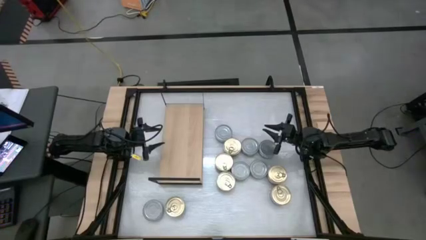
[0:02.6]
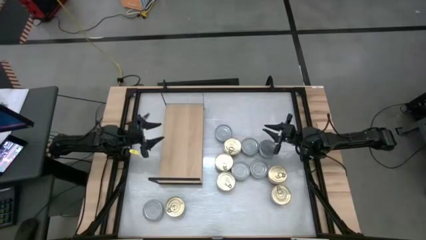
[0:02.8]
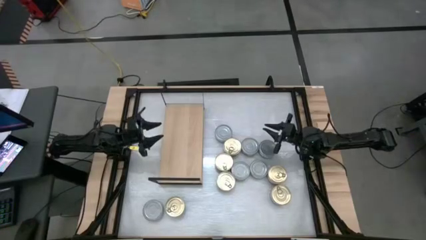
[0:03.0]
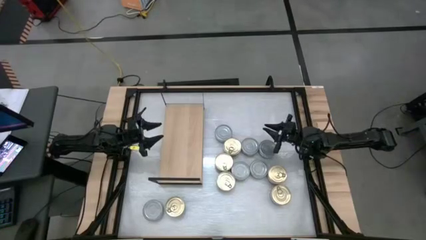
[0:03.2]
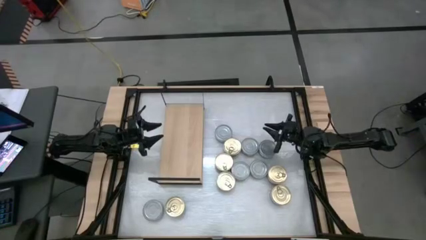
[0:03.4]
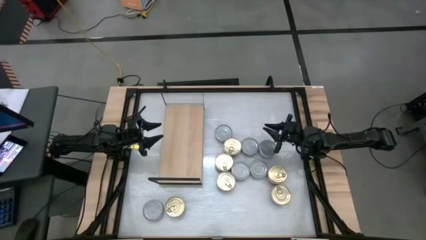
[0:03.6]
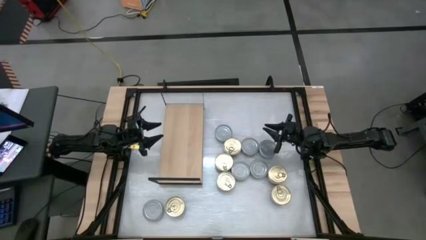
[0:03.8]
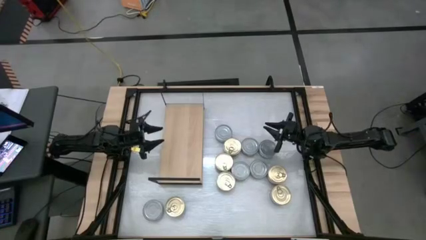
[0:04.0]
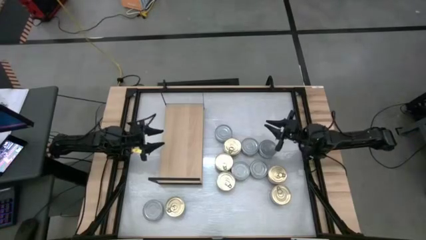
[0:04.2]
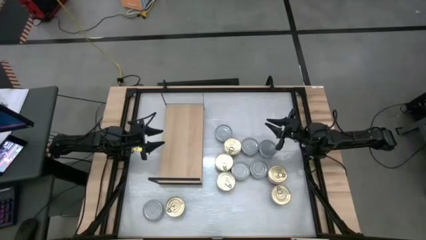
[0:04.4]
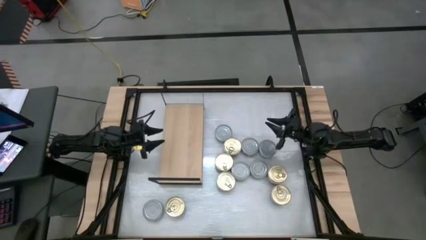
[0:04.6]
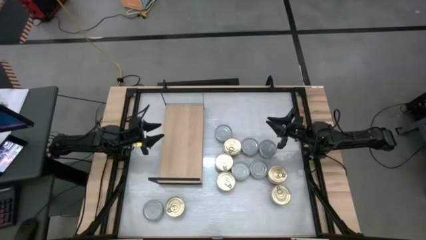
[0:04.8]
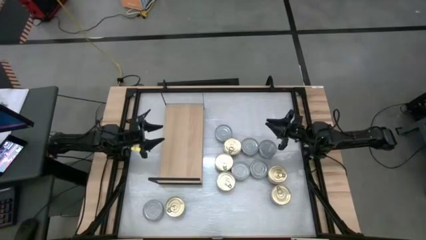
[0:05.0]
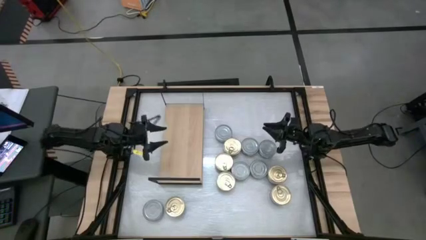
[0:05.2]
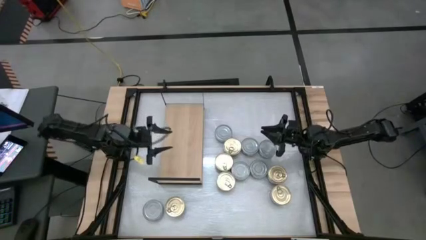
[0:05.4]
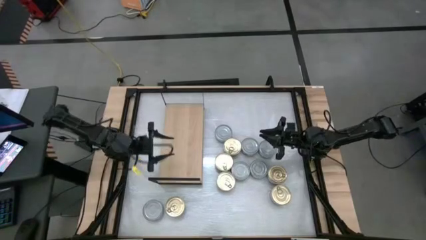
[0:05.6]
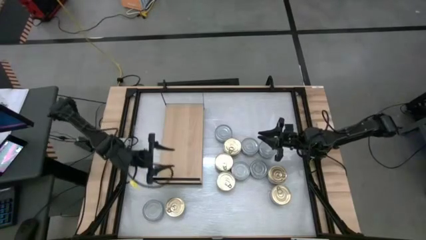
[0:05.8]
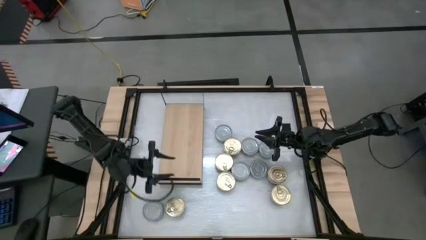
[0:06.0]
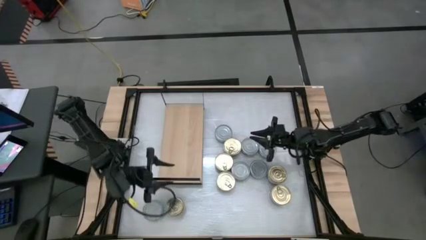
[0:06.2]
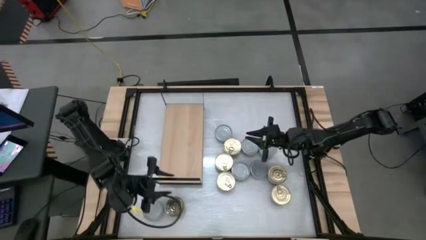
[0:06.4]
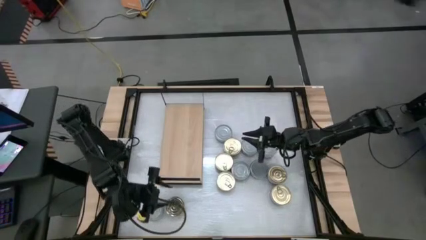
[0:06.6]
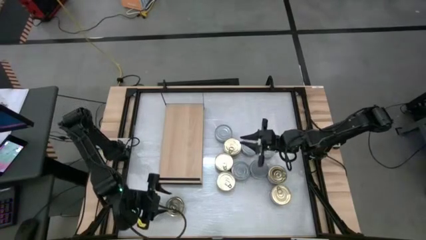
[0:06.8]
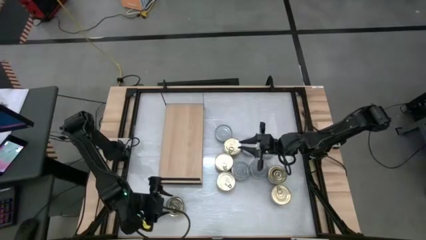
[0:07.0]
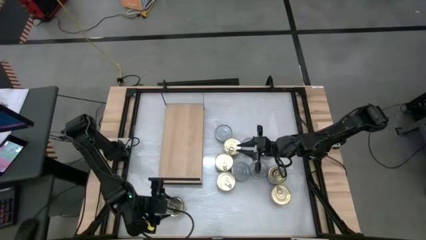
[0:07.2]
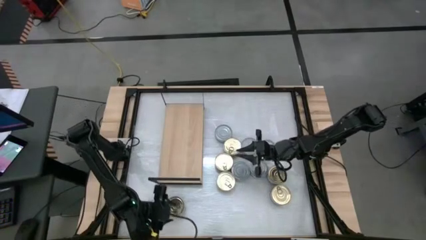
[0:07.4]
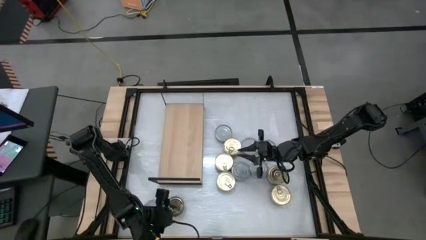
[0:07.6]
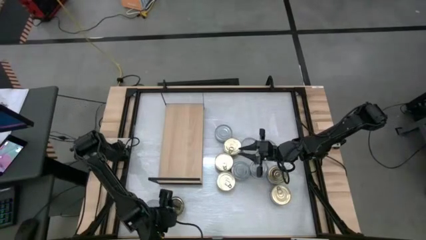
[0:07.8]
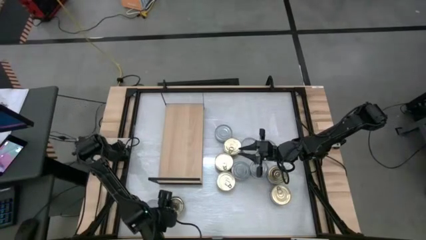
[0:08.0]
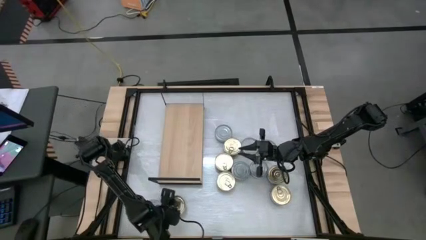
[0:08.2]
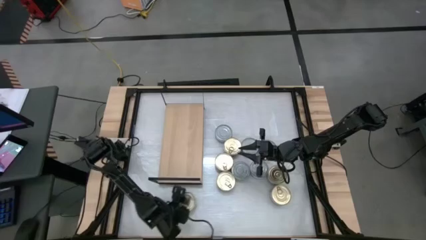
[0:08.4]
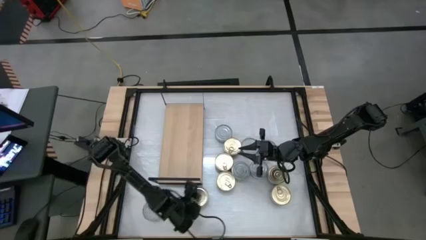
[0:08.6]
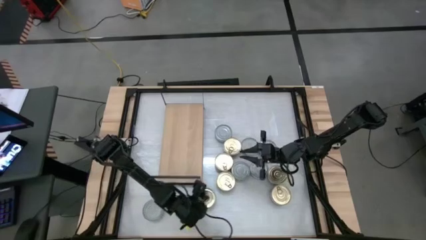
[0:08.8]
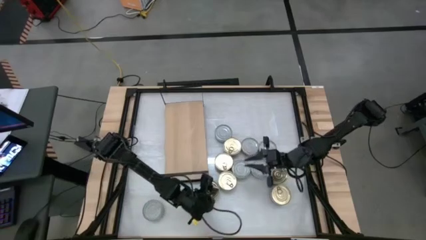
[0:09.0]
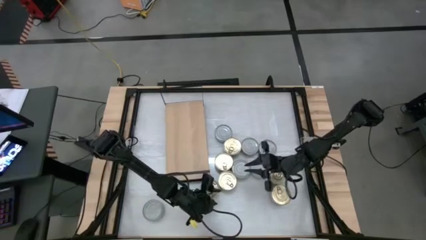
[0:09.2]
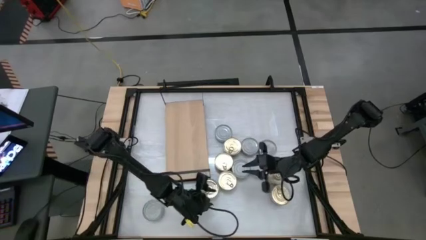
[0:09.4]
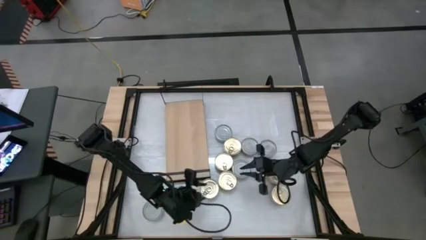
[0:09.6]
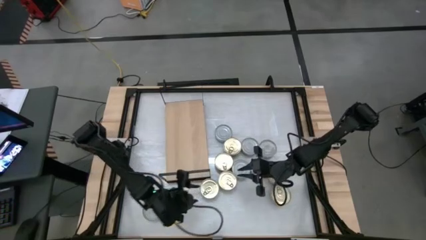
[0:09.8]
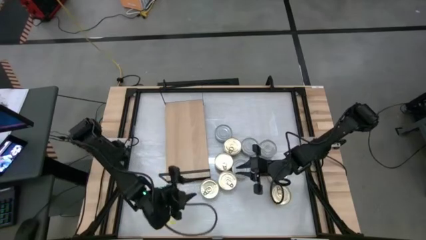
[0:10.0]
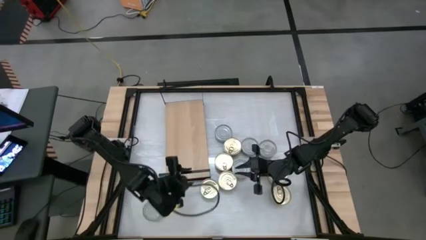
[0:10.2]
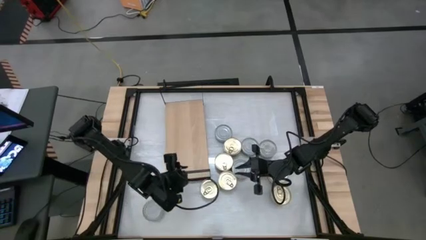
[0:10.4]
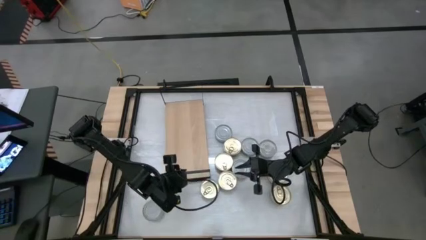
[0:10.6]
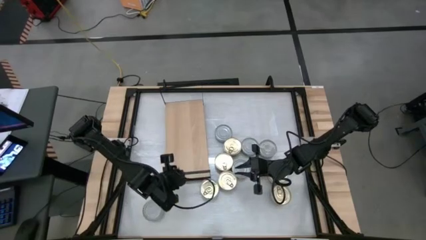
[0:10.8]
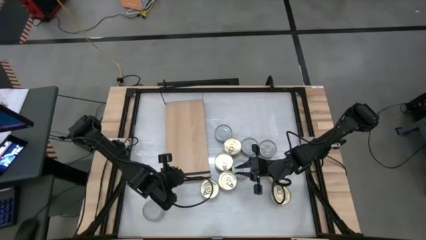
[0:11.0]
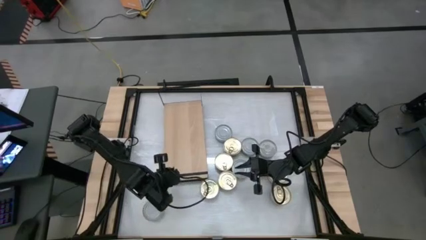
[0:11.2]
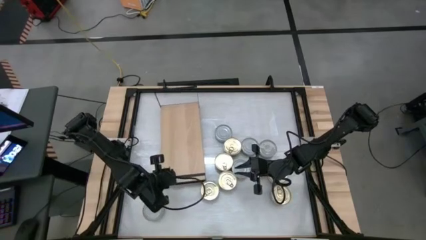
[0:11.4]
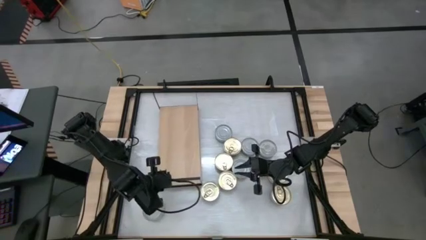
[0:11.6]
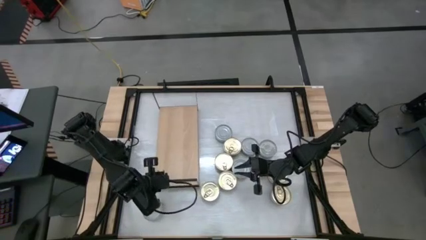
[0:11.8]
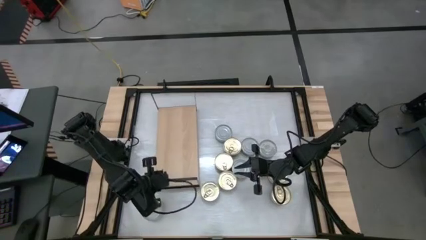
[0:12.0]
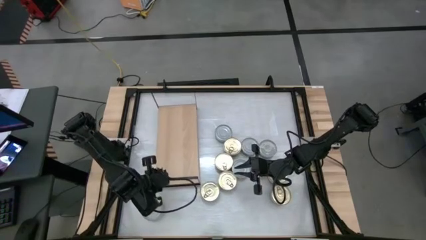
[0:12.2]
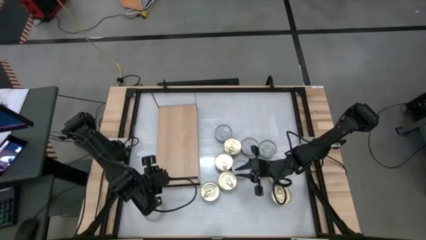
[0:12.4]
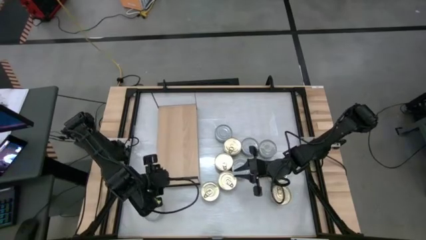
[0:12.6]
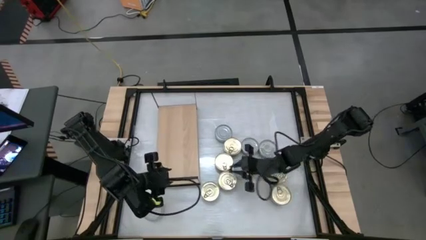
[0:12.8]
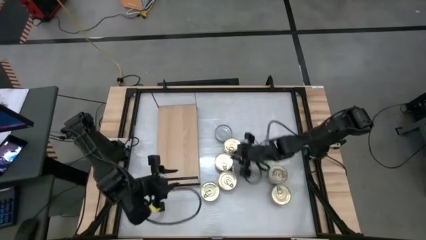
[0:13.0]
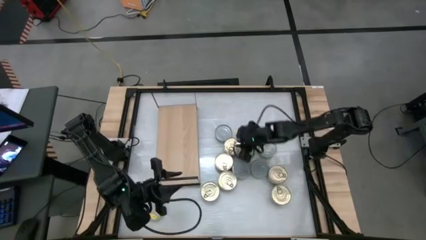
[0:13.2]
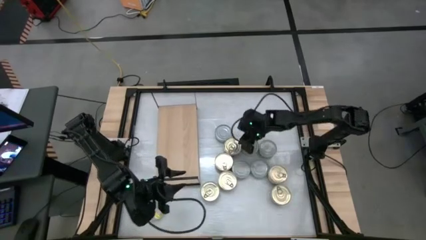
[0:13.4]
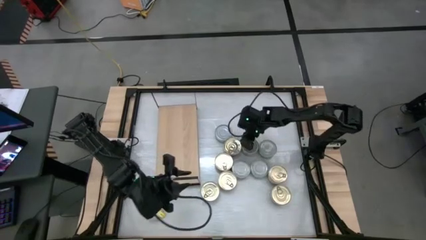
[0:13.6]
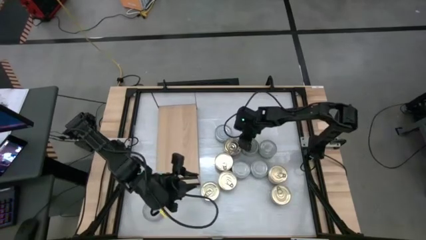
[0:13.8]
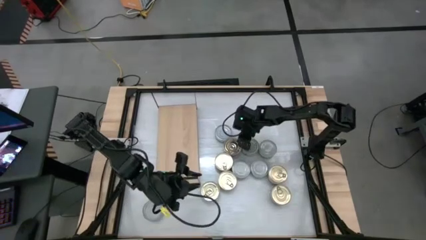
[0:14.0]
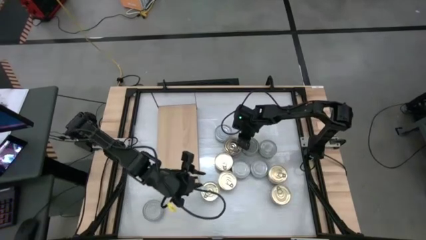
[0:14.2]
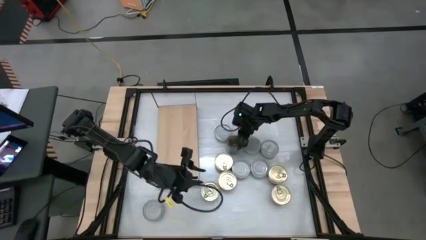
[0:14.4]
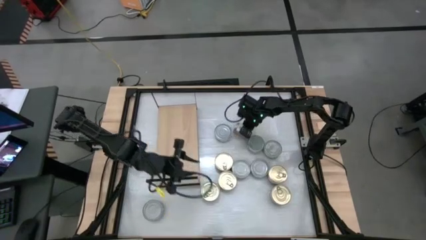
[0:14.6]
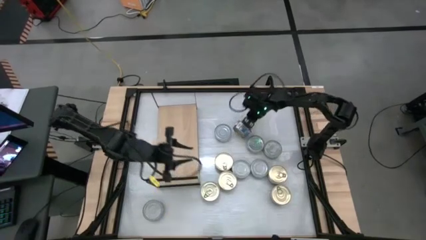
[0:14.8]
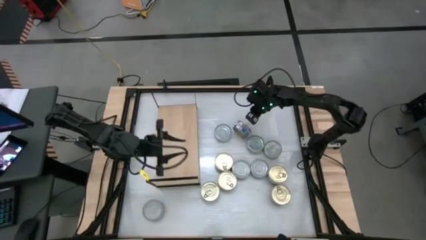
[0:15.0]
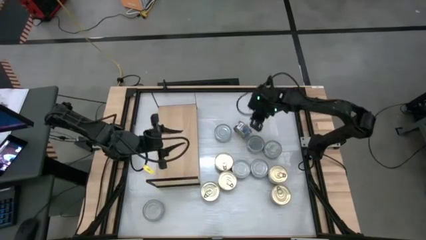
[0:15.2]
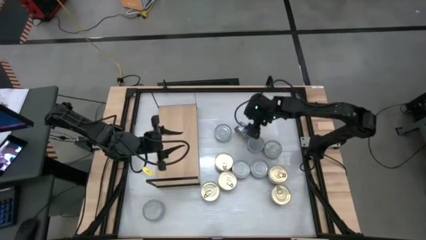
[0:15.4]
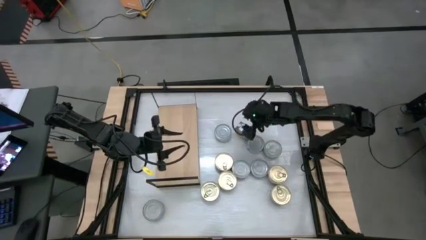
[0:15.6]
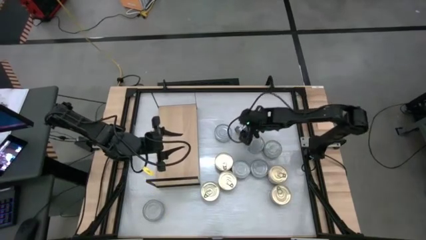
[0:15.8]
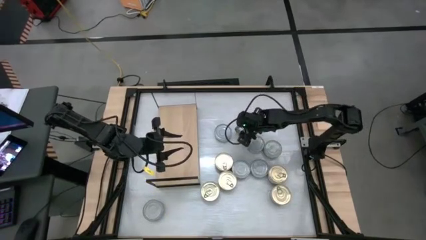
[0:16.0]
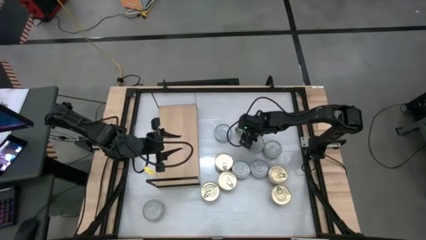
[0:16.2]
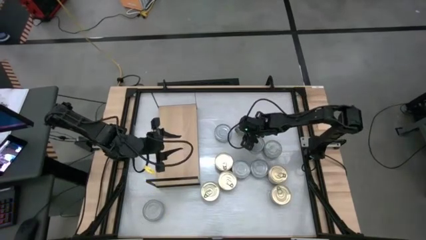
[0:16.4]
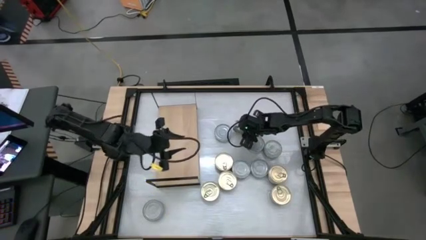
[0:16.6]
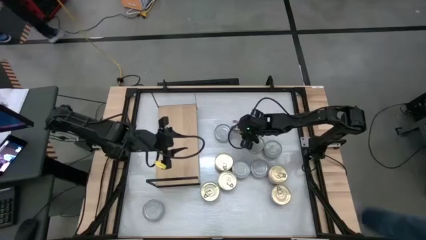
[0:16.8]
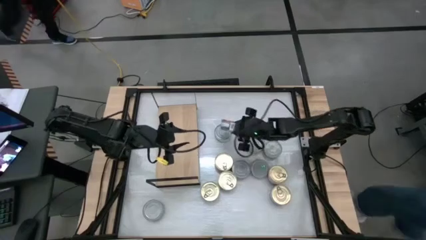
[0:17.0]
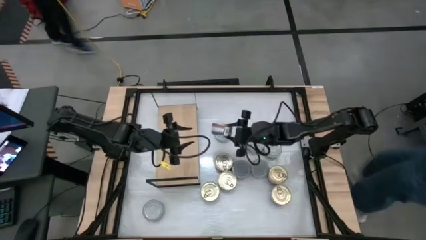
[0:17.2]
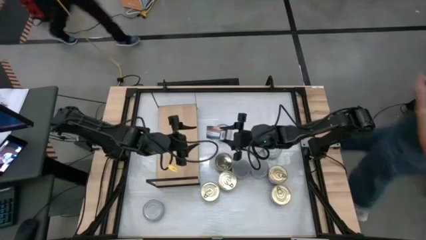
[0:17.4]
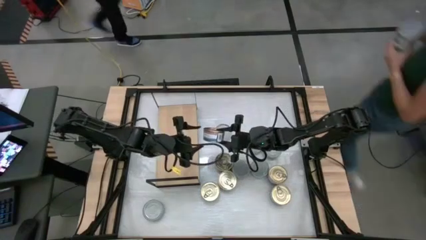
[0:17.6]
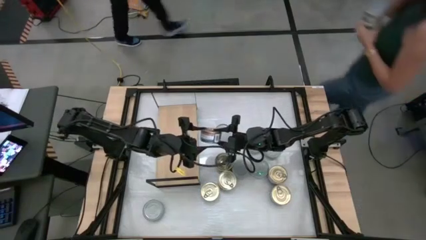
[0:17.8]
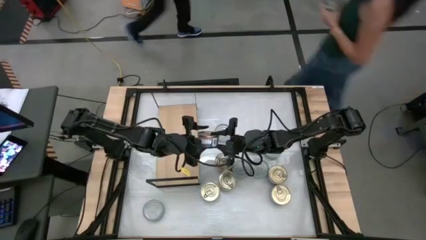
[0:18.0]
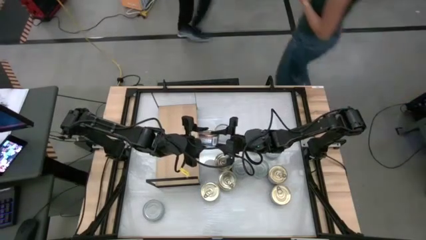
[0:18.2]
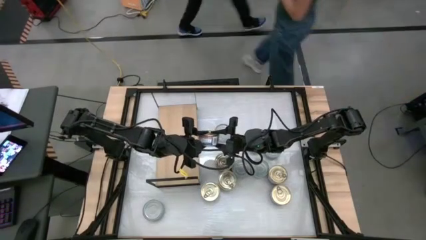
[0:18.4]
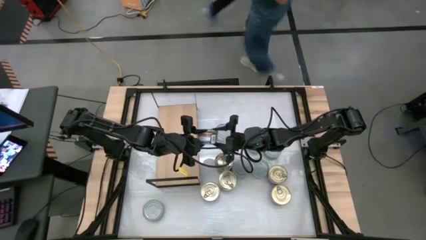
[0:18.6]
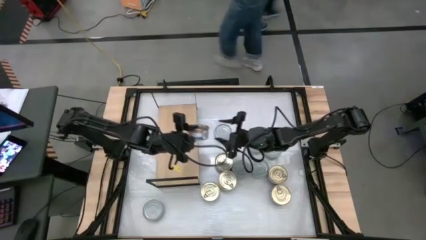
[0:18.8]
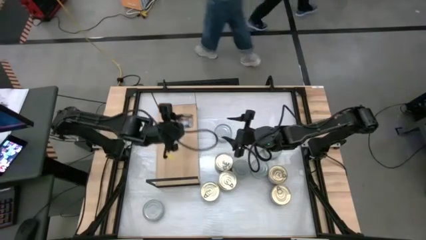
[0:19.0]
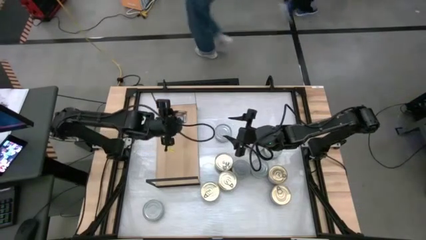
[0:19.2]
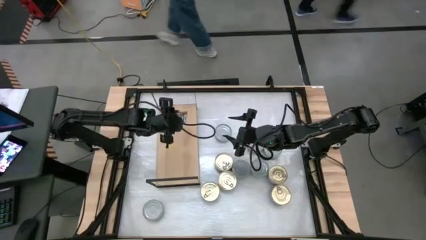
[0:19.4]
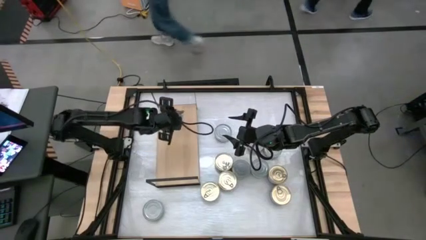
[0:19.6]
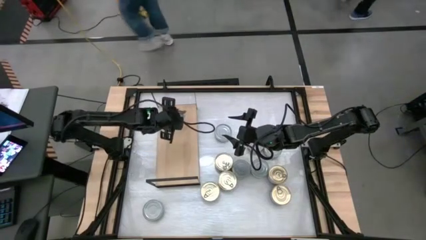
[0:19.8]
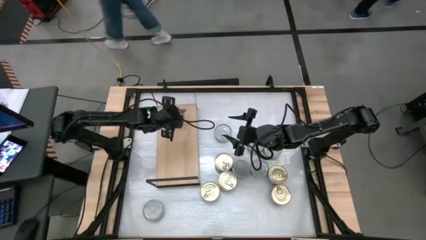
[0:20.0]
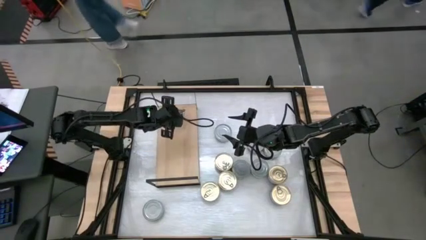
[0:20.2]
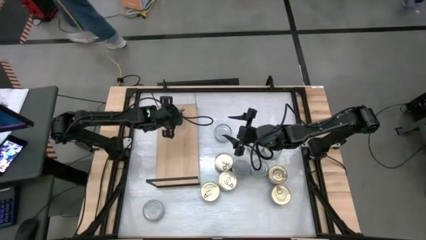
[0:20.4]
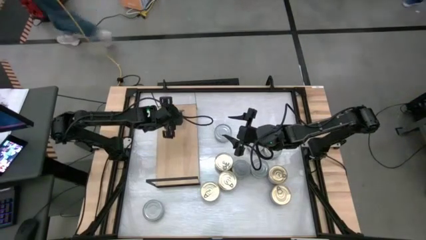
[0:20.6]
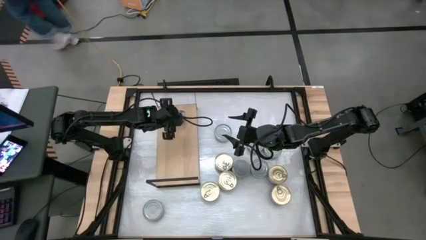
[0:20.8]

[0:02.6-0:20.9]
Task: Stack canned seafood by type on shelf
Put the blue-pink tuna can on the shelf
